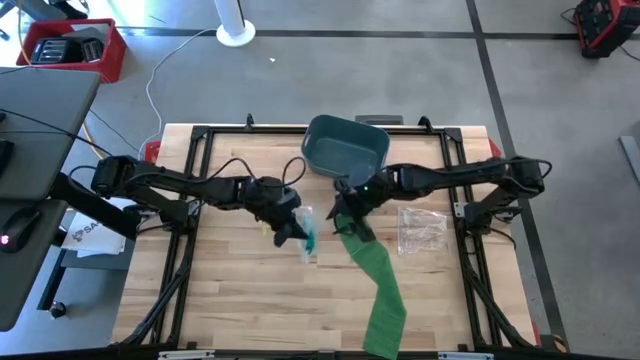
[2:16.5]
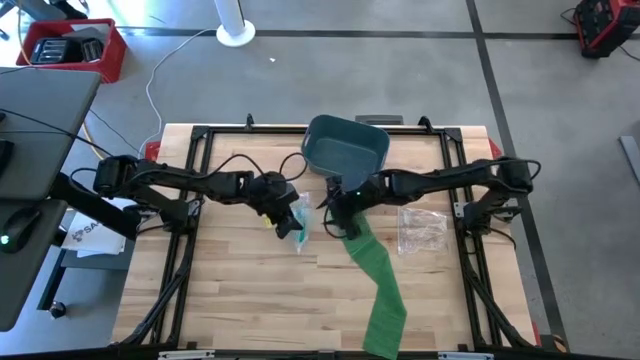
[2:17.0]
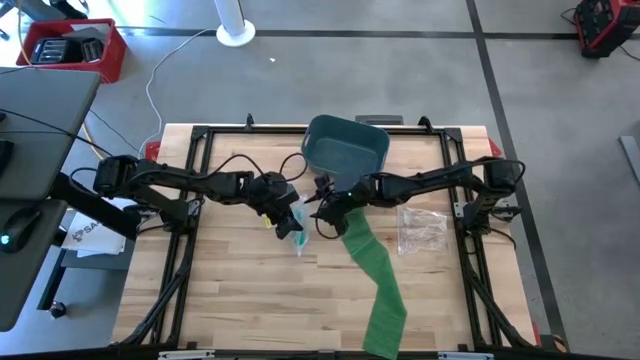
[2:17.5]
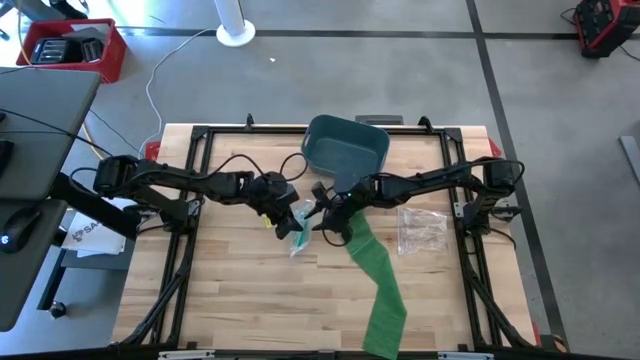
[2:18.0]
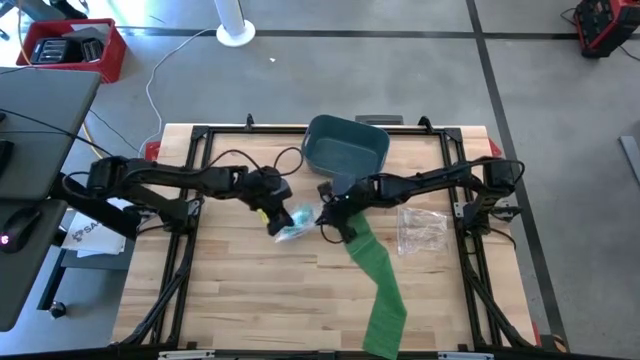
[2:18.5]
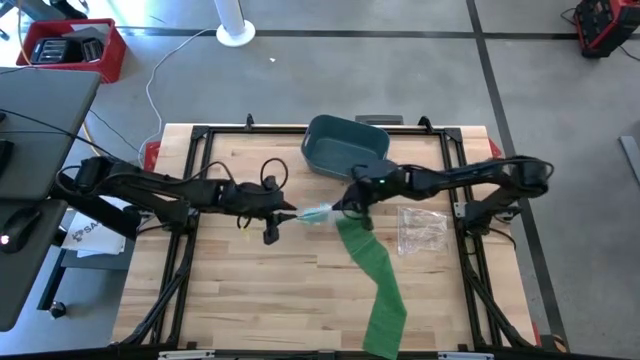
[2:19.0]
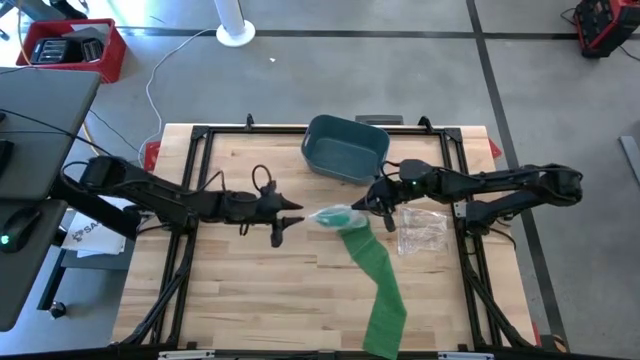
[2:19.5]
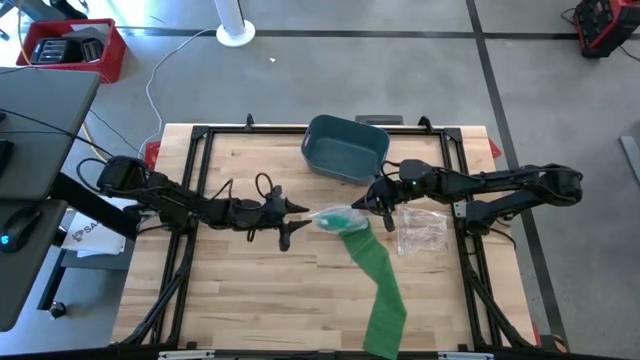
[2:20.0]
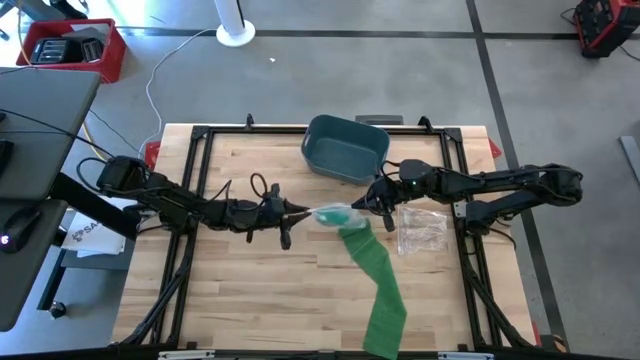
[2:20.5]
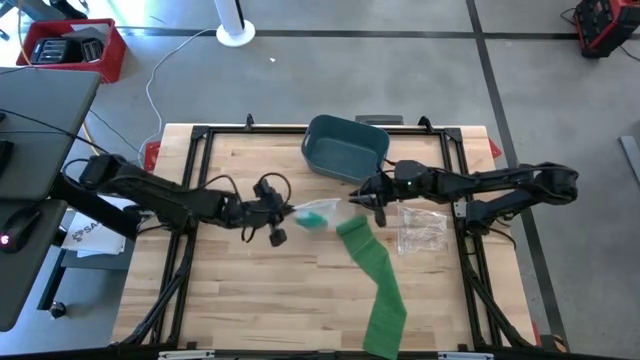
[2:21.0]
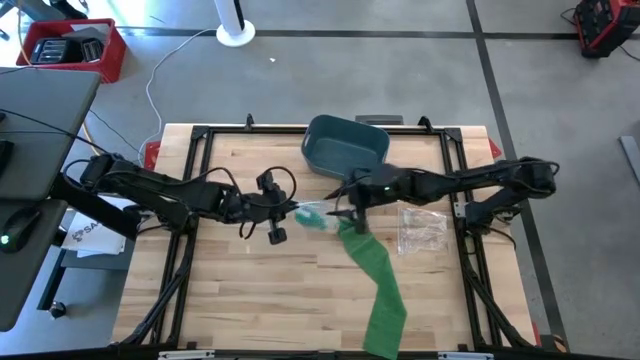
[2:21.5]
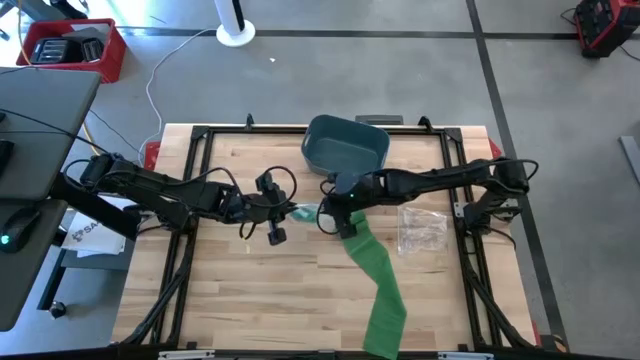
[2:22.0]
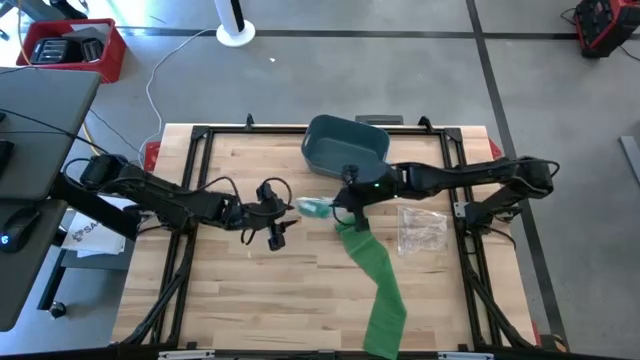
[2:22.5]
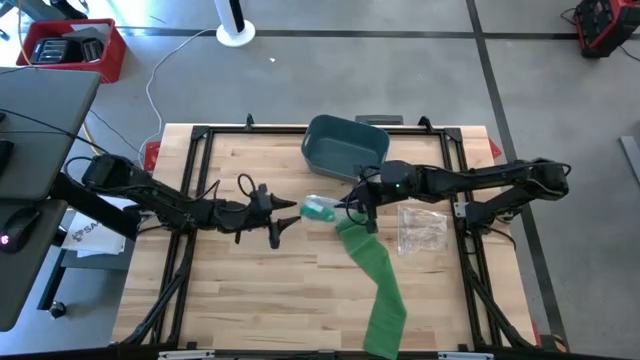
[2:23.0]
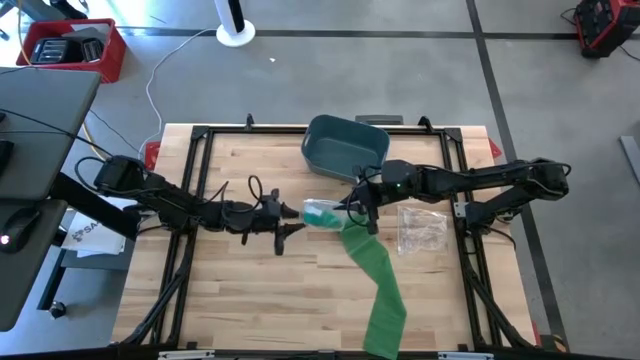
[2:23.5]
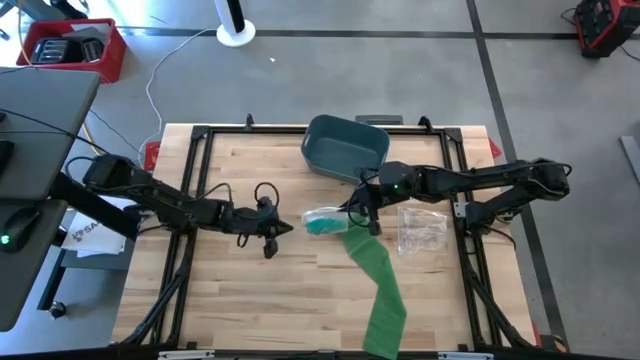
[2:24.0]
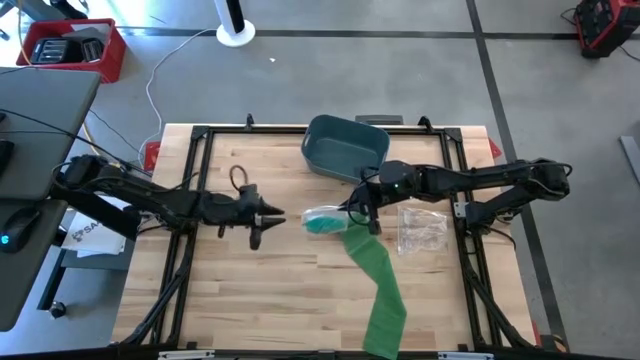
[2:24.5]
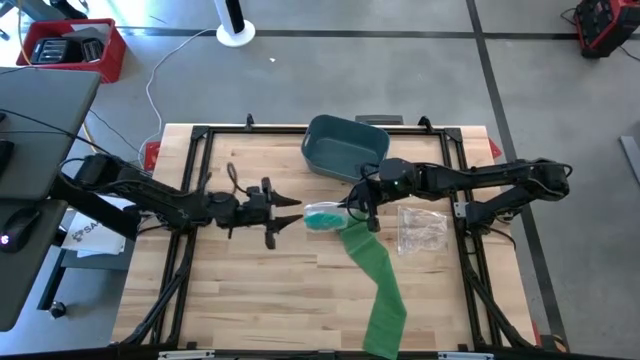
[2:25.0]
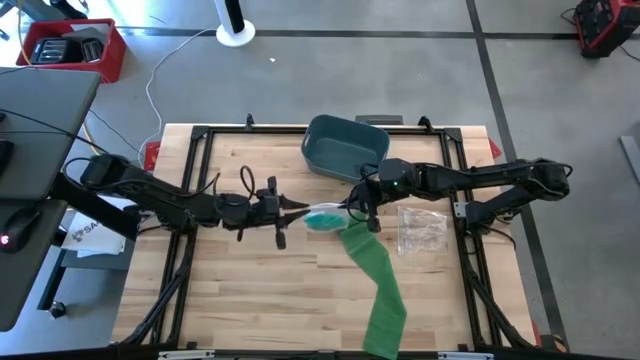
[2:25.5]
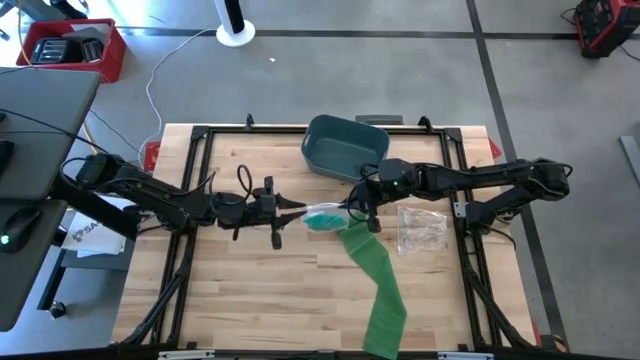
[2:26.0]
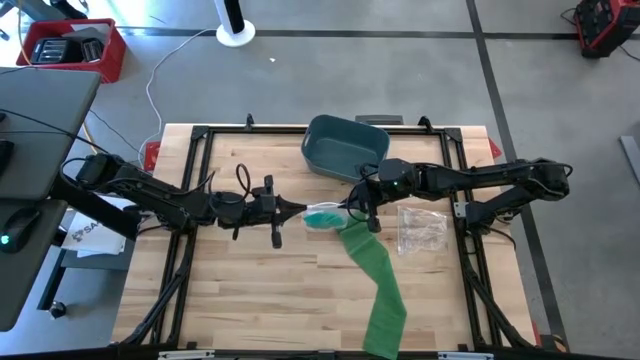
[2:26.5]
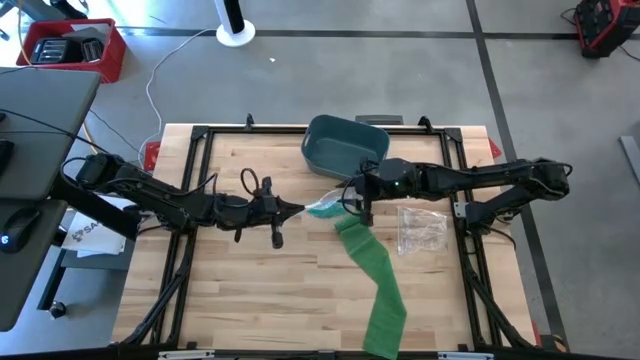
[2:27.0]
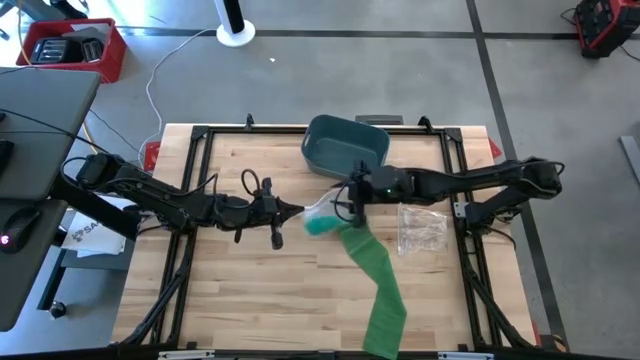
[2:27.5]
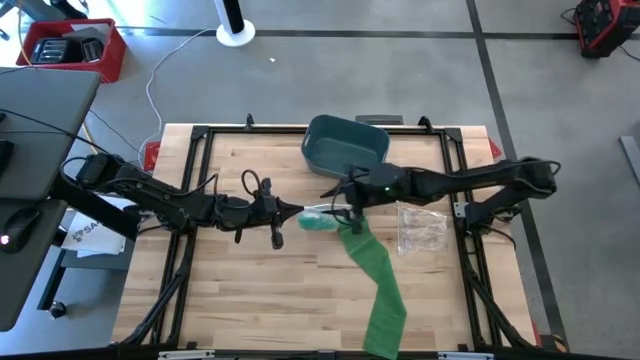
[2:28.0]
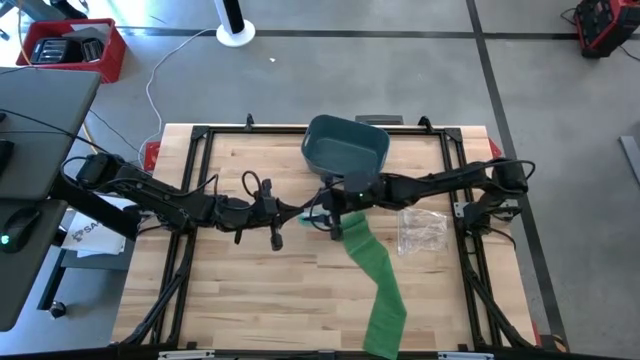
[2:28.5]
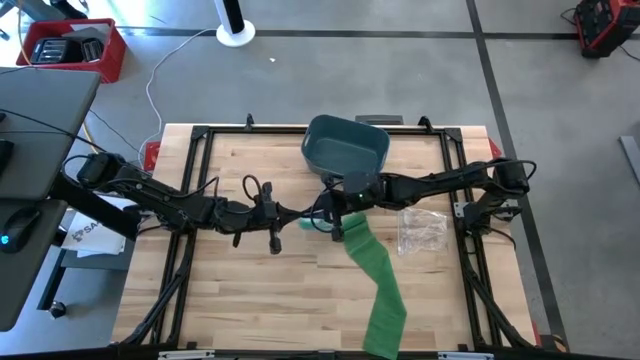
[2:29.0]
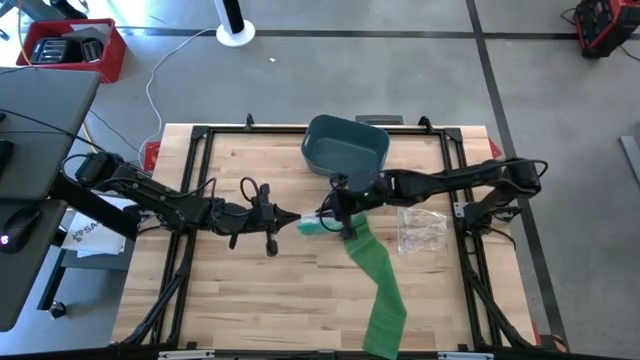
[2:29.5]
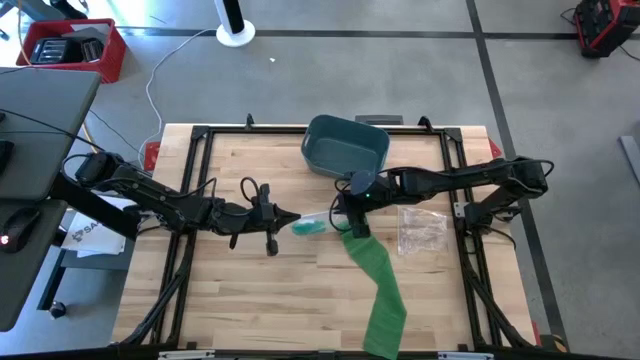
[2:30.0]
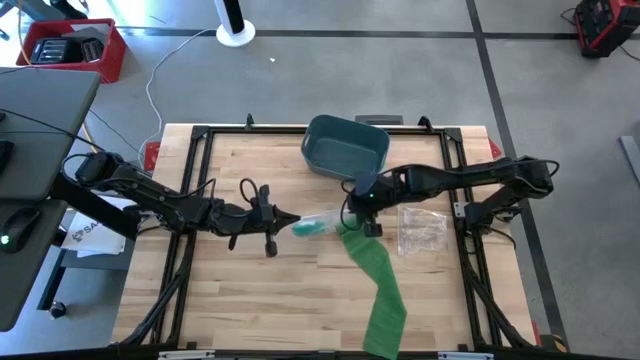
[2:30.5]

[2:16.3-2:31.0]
Task: Roll bandage
Close the left transparent zip bag

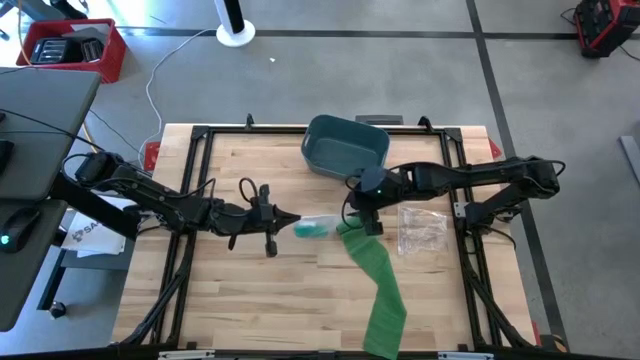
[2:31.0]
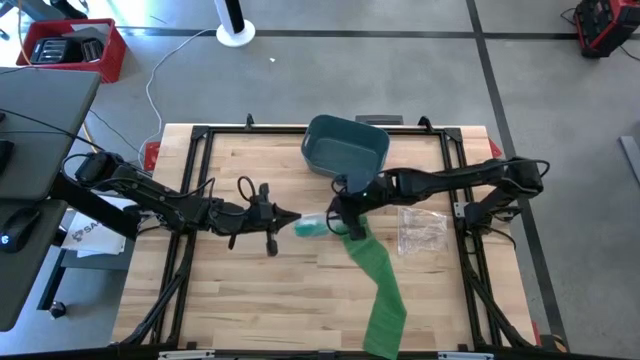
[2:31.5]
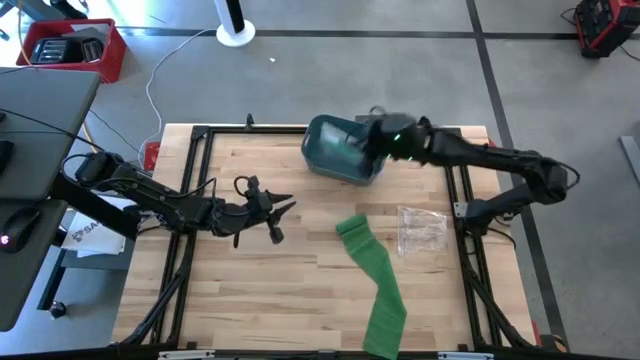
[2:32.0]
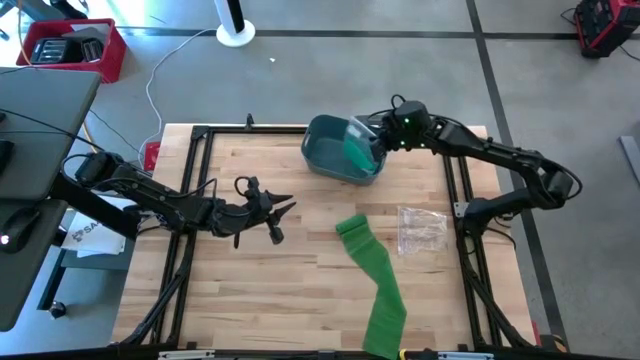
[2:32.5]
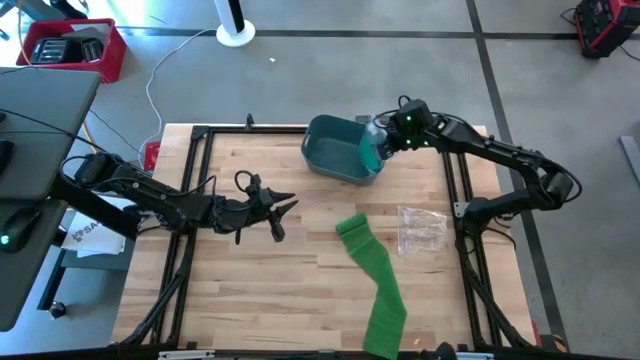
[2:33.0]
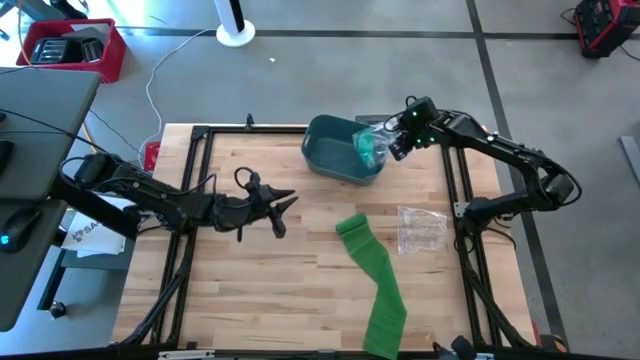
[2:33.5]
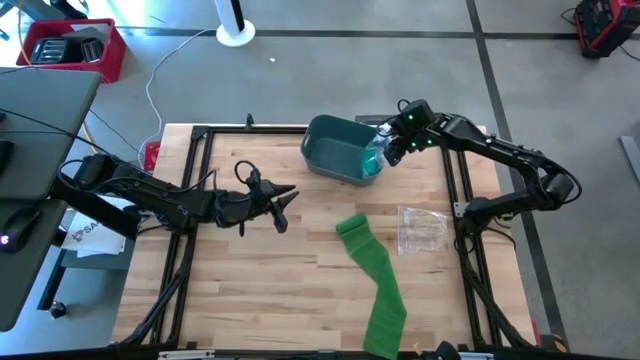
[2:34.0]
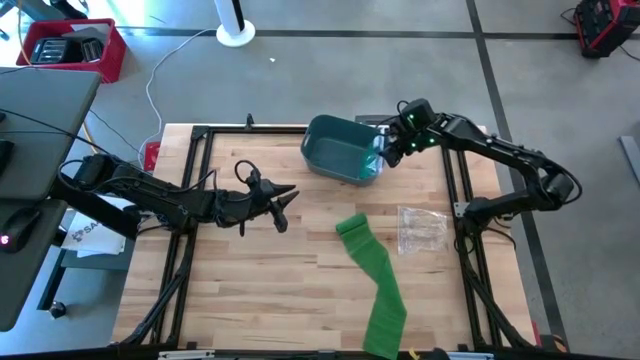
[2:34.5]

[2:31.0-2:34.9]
Put the left transparent zip bag into the blue bin

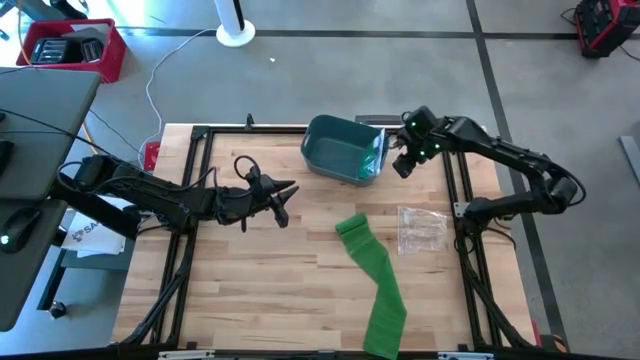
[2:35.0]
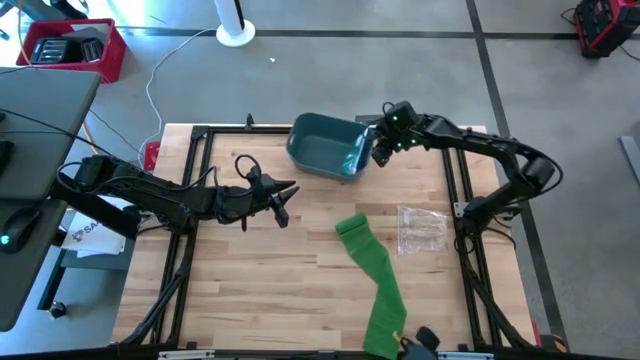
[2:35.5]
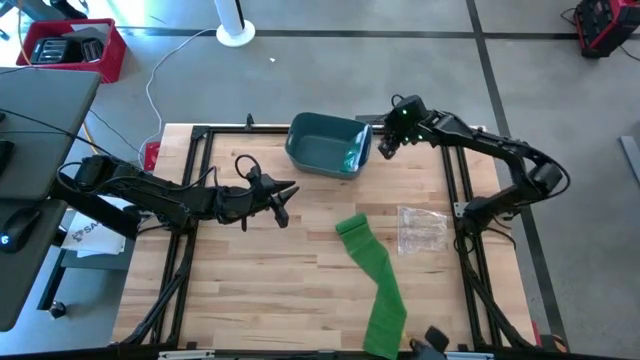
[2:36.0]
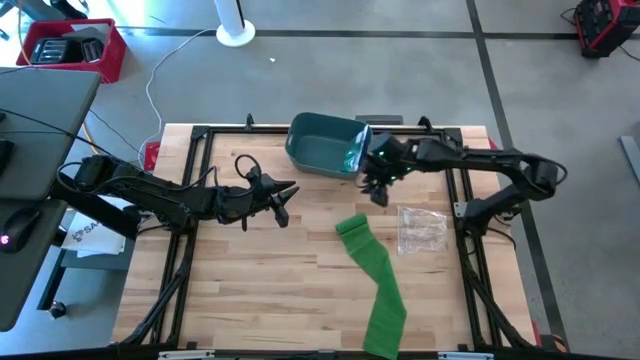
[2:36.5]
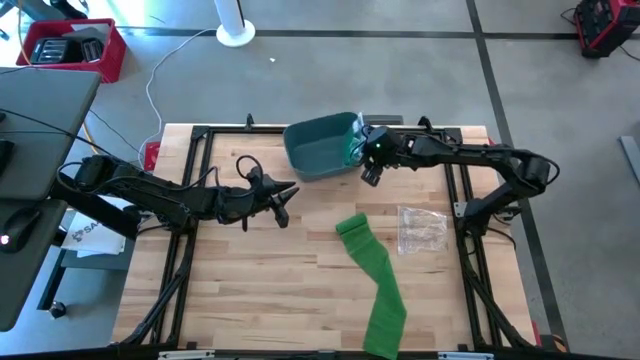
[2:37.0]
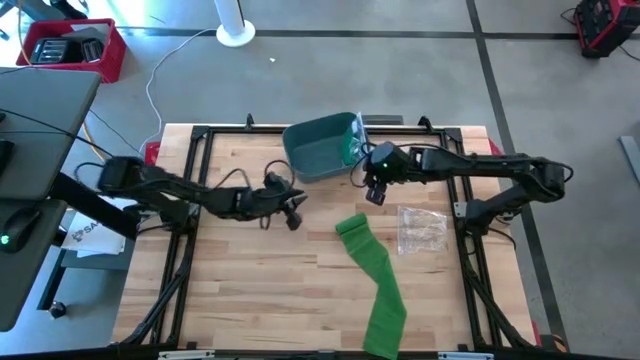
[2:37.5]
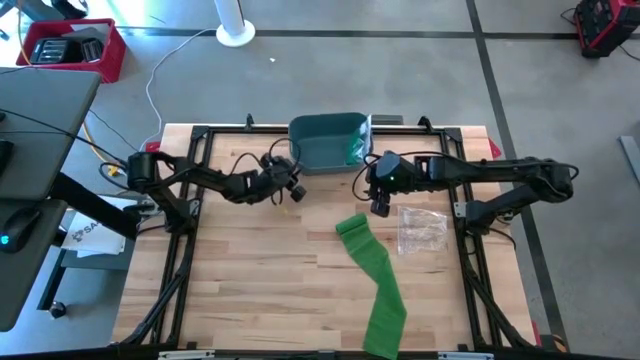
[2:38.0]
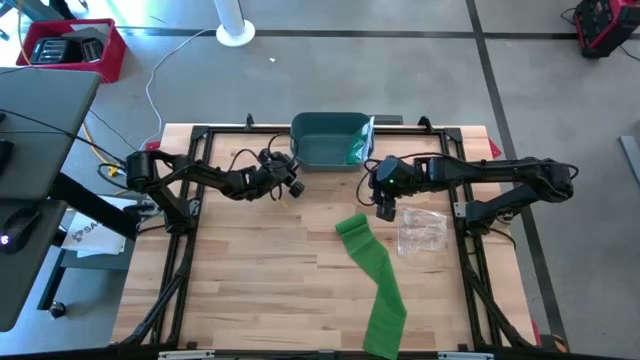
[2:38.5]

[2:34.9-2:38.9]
Adjust the blue bin to the top center of the table
